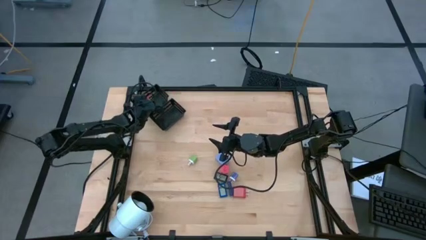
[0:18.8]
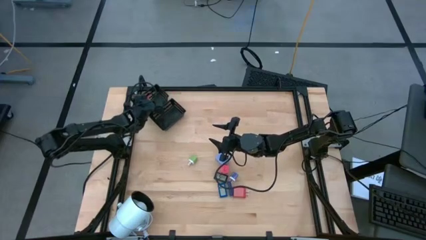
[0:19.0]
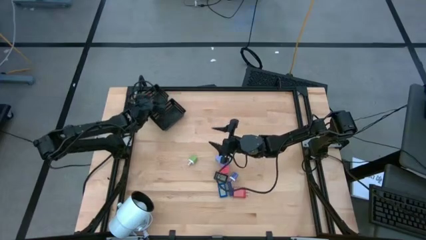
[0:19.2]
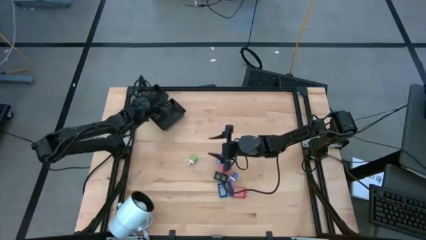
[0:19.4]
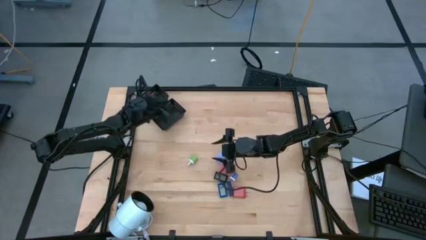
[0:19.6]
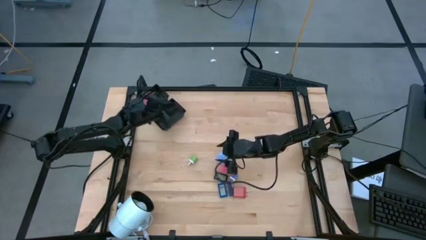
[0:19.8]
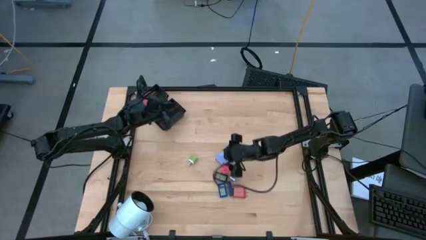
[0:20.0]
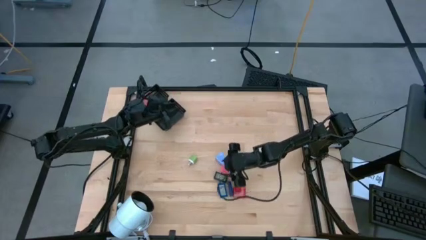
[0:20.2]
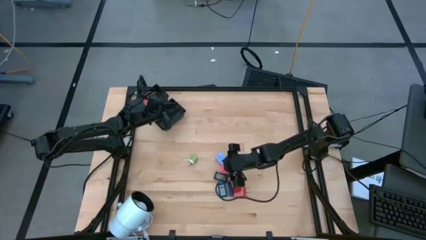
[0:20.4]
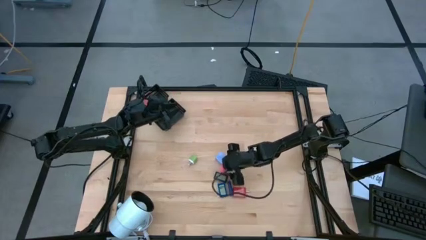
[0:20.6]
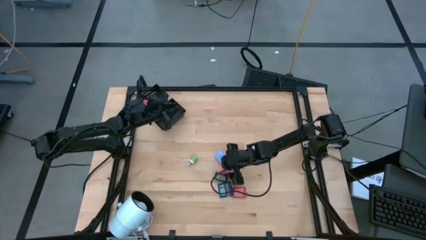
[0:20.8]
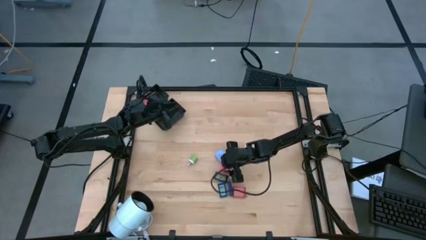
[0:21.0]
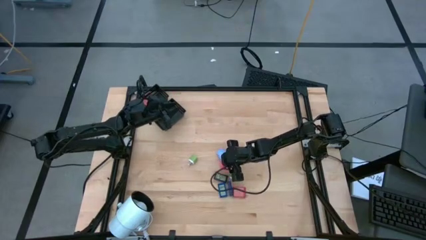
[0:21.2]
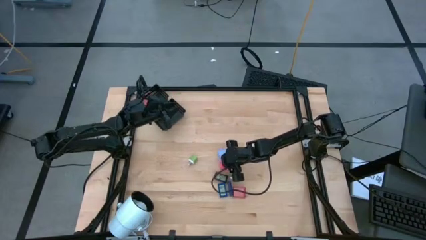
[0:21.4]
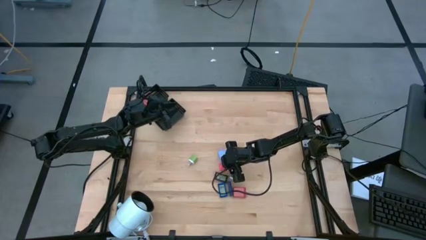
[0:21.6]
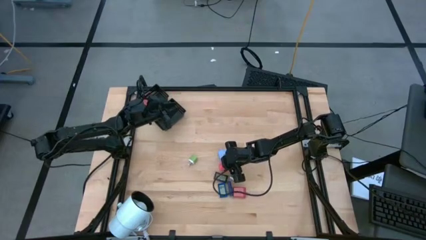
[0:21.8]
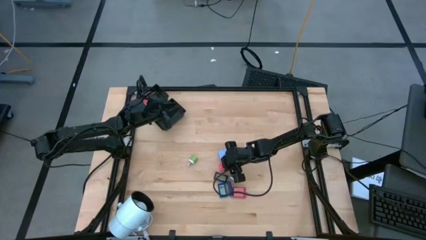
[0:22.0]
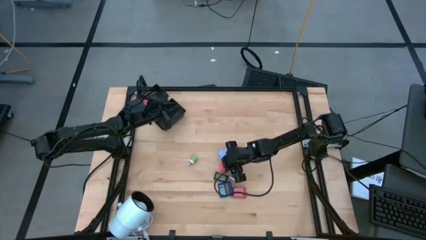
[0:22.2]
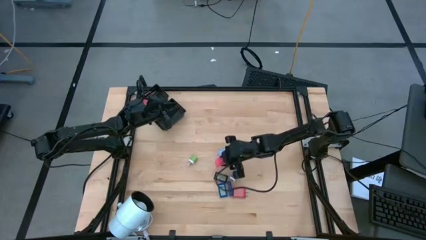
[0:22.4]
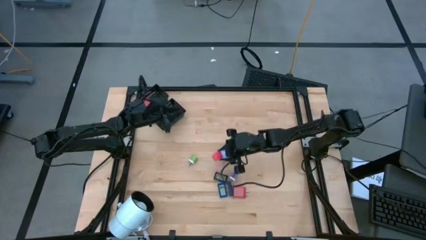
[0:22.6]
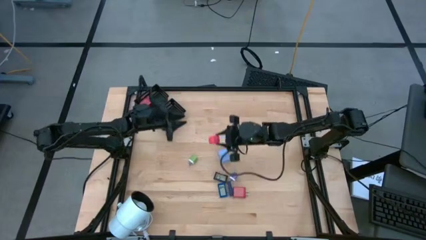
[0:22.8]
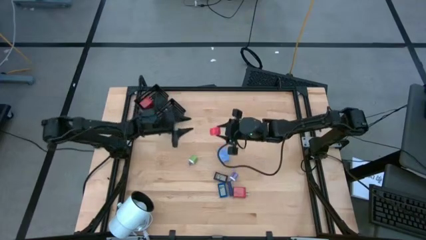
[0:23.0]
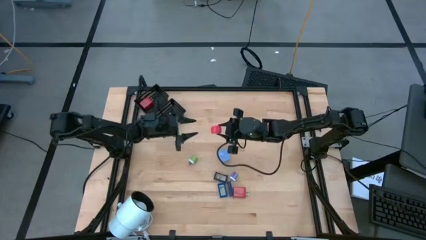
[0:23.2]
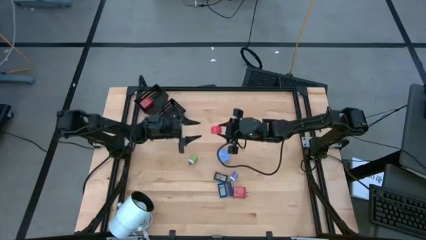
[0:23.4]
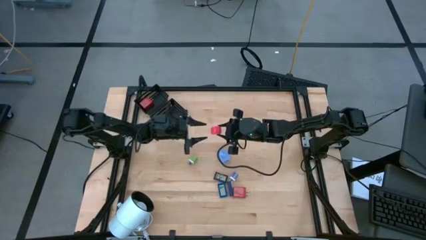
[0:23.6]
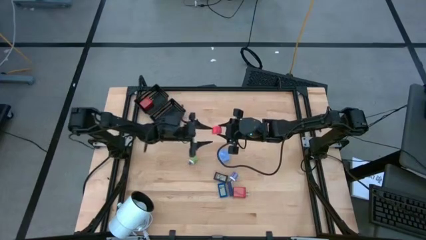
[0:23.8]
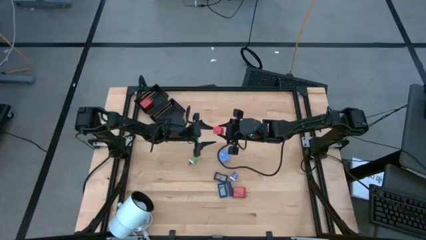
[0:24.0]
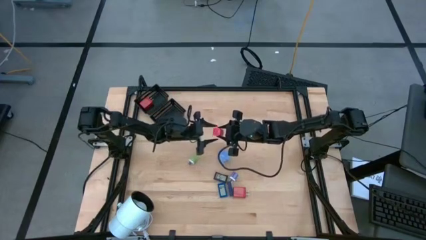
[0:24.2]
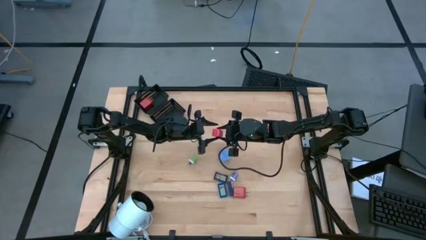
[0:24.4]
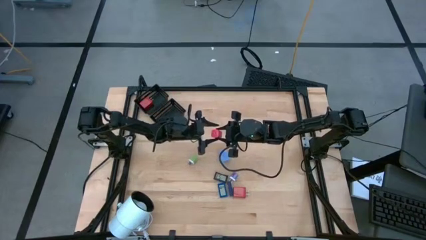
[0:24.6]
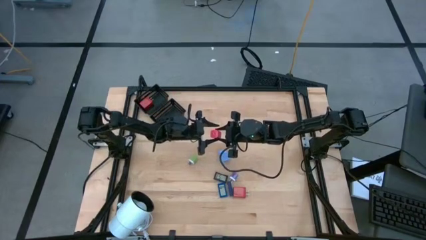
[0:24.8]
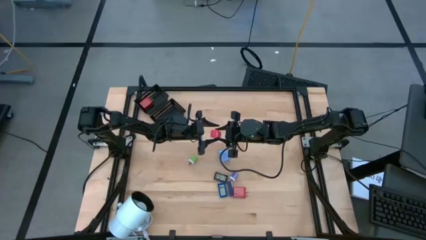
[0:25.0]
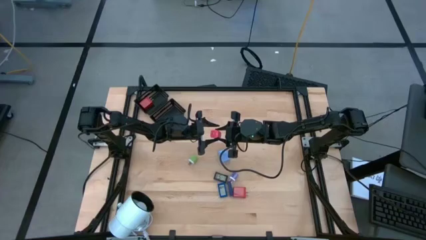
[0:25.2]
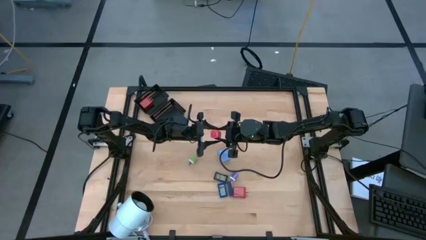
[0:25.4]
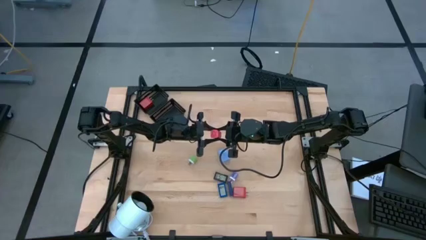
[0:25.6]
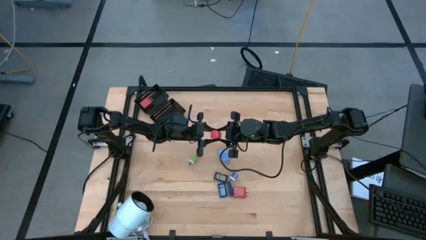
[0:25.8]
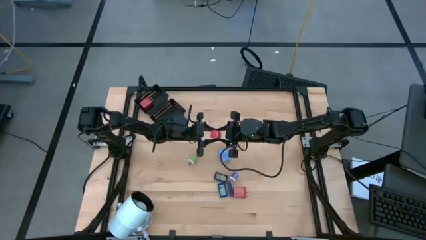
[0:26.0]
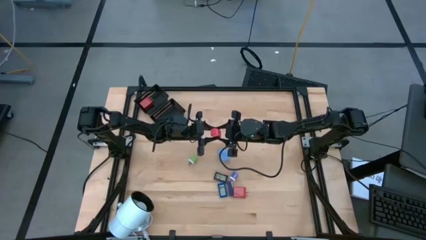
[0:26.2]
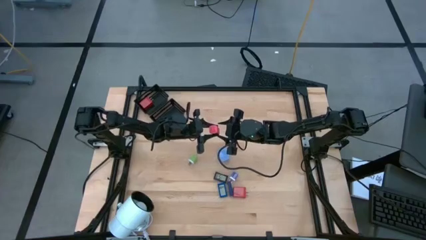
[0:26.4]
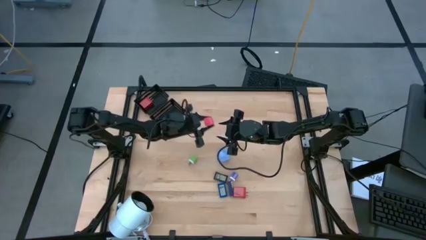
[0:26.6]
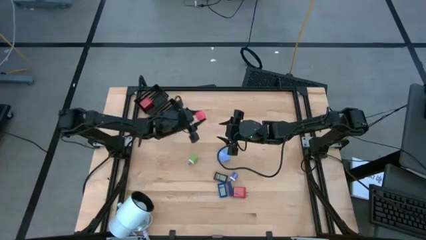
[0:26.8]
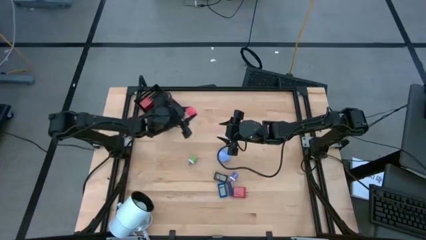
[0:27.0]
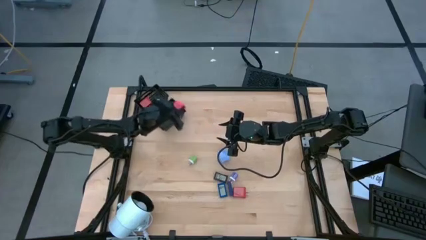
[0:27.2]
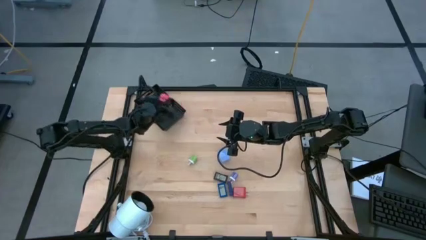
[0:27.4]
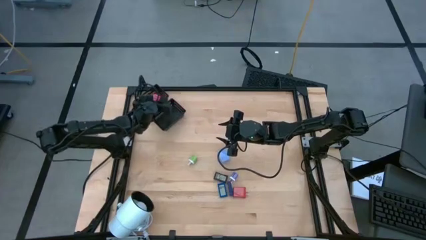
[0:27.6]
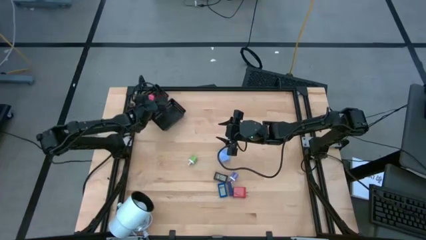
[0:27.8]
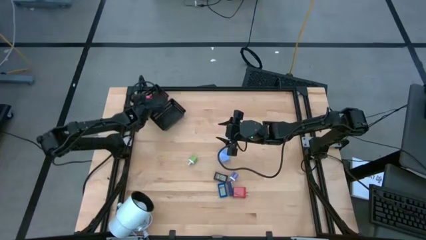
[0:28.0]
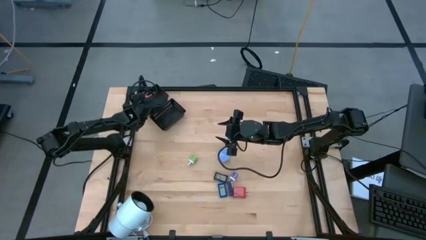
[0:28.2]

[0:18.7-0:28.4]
Task: Pick & Place Office items
Put the pink charger adapter into the top black bin

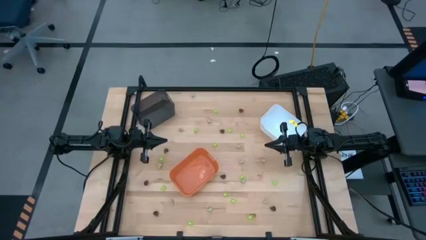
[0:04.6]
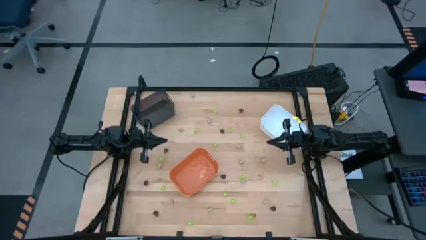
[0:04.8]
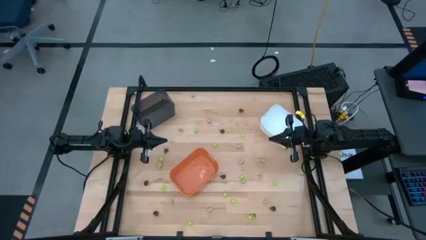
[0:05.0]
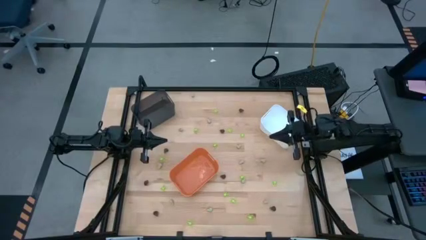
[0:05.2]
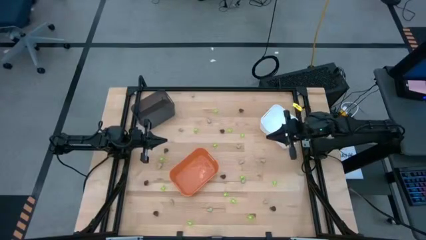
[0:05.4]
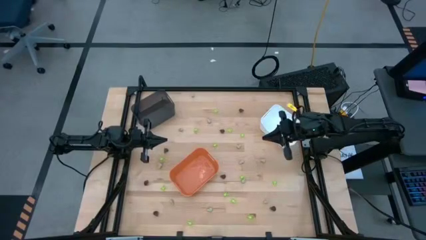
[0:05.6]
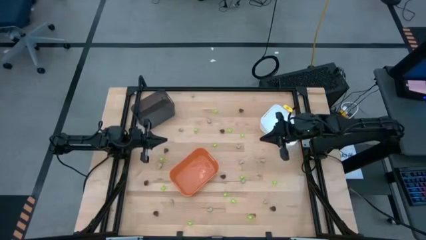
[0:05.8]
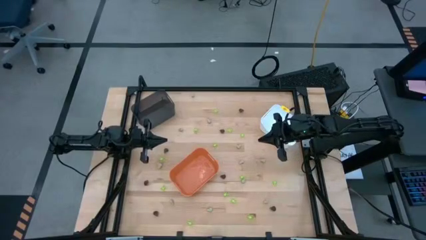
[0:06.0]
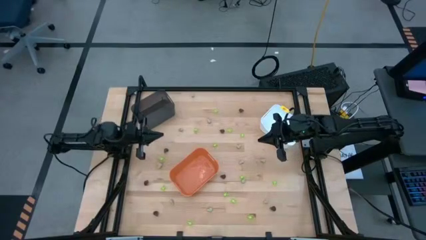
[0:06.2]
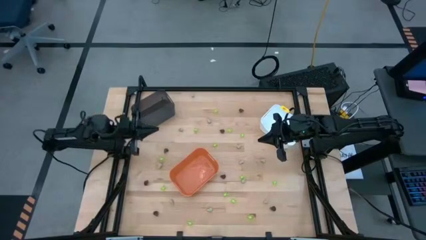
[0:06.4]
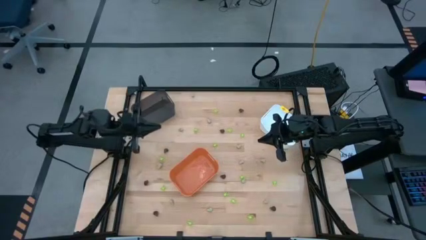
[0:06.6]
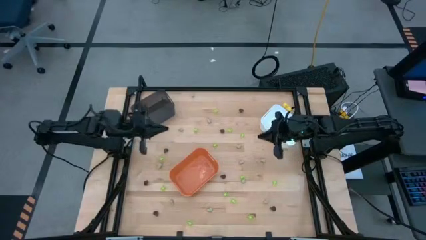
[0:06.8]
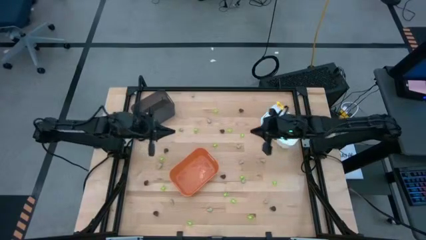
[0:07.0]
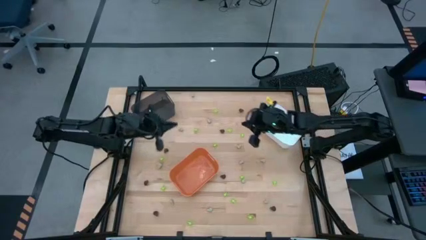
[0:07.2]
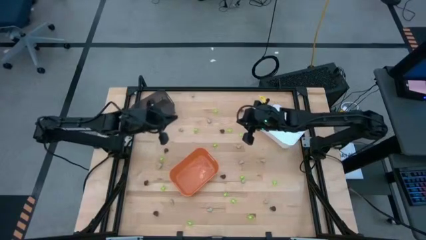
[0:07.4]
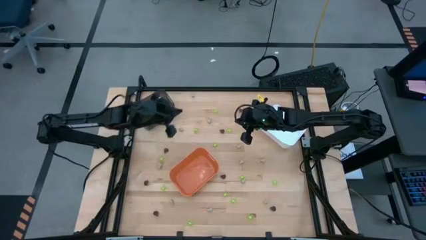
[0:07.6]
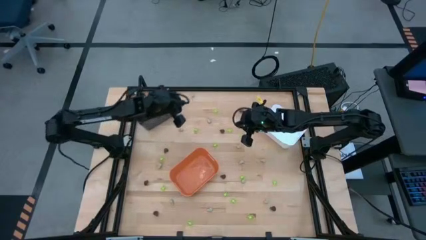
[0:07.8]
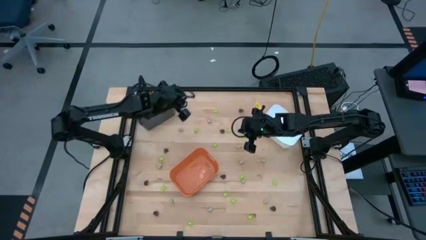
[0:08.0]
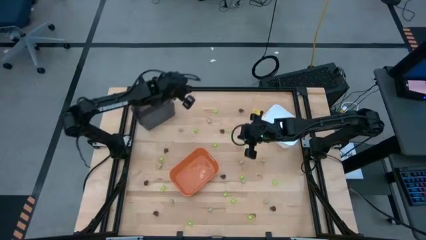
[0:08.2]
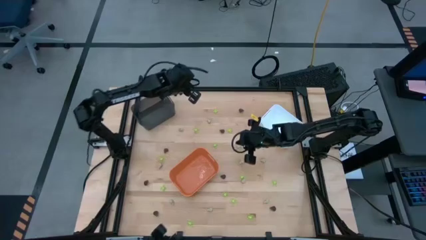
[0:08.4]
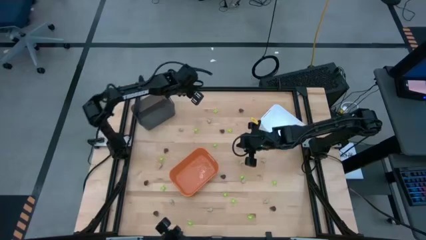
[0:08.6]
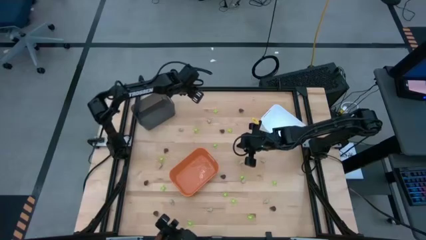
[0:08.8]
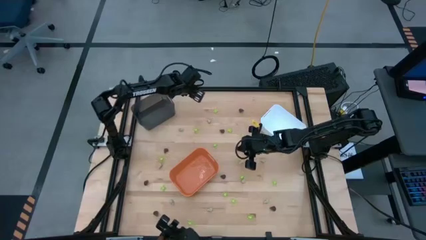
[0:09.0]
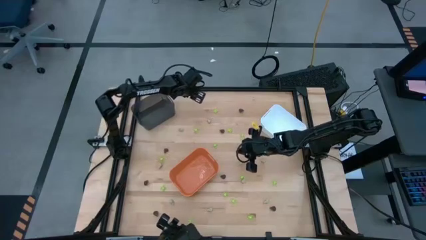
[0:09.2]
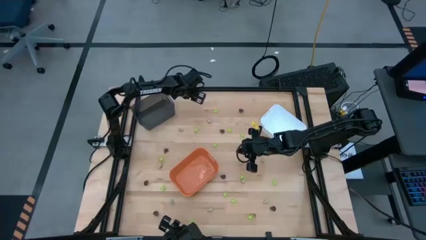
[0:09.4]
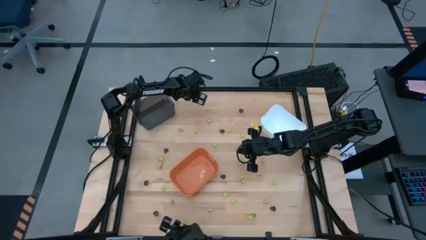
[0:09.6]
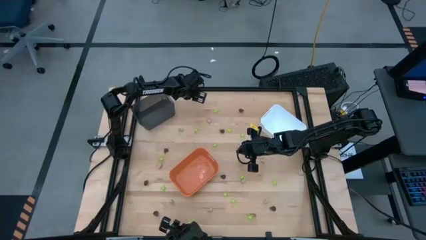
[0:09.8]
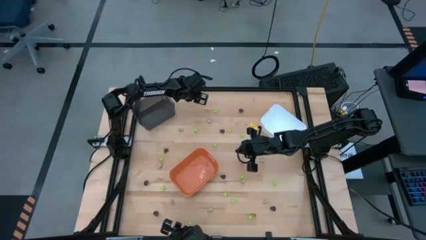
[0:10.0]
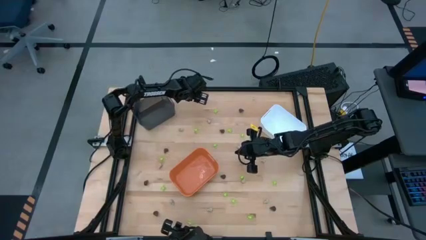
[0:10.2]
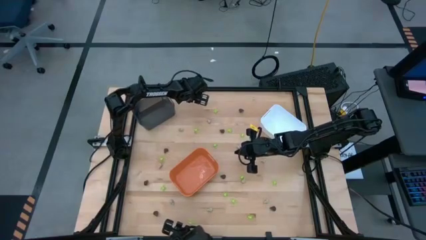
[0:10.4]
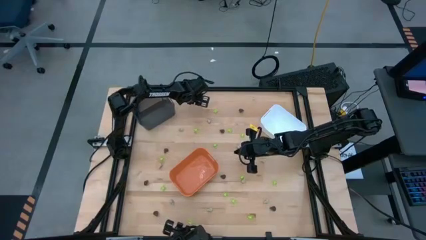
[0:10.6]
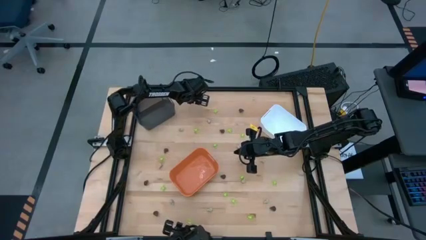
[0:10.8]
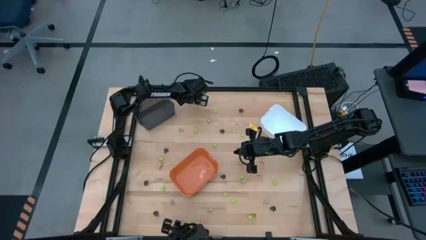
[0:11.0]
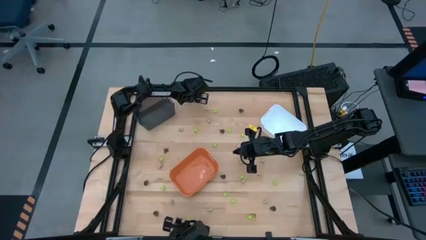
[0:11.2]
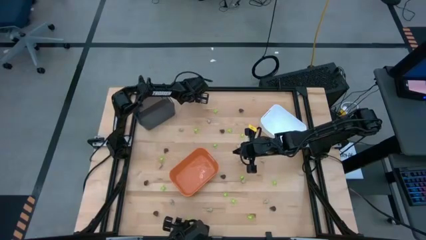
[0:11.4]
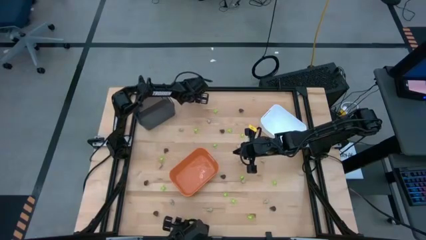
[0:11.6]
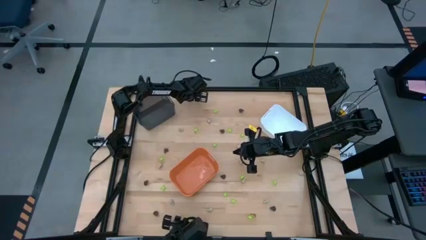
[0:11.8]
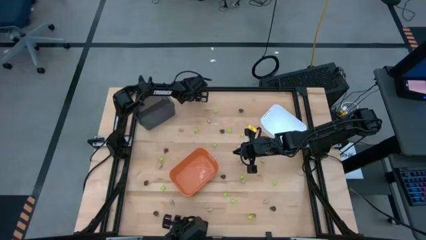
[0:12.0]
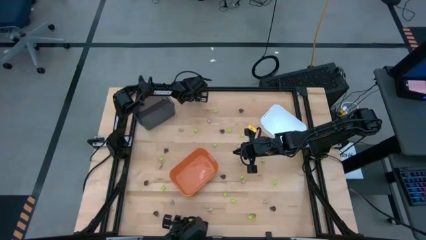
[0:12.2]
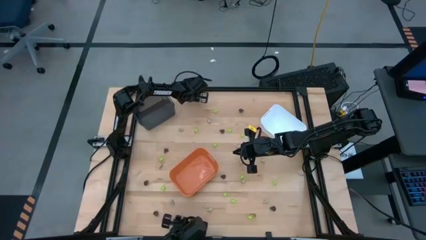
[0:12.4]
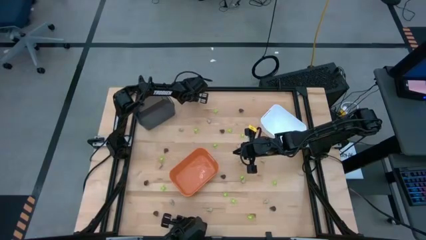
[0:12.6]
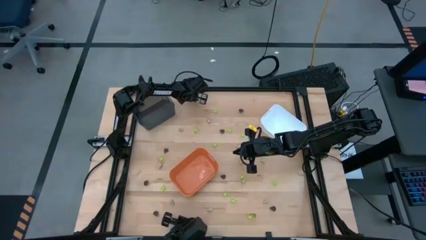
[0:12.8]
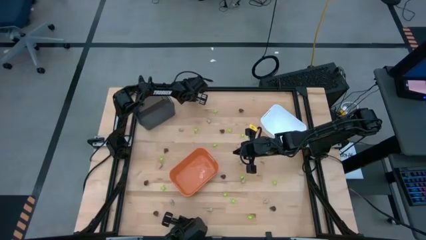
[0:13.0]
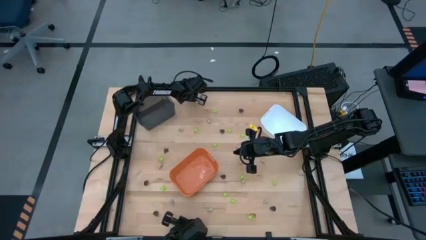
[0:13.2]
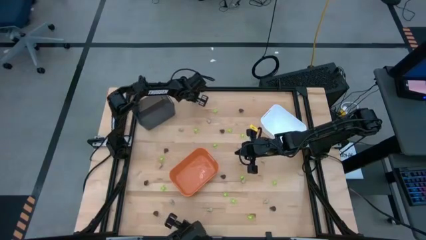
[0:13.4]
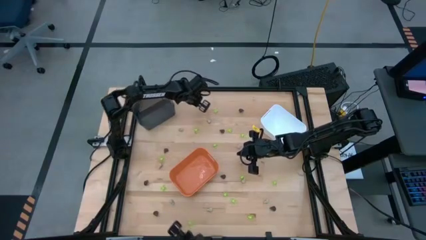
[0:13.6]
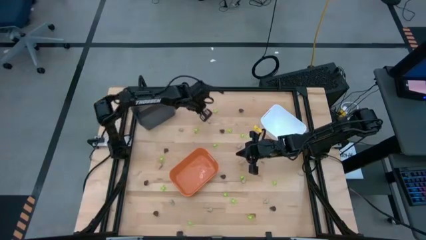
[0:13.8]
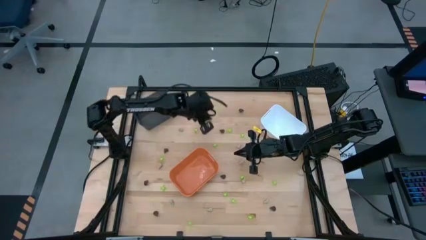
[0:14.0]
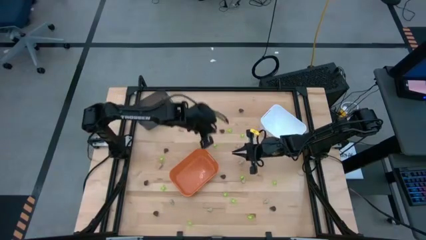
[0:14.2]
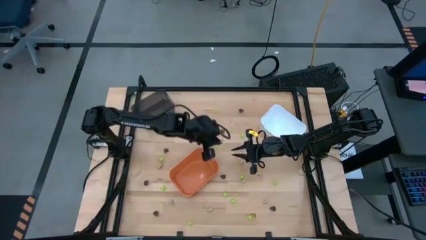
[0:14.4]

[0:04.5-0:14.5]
Task: Sort Halloween decoration
Put the small white skull toy into the orange bin
